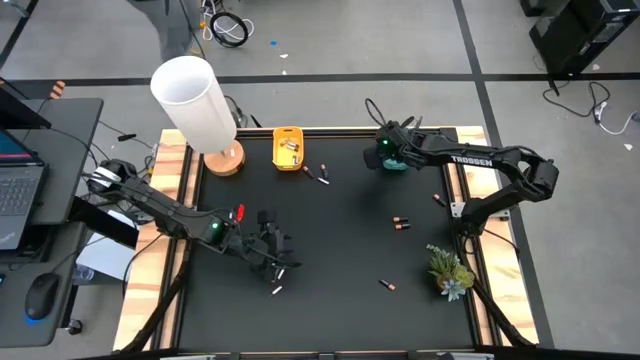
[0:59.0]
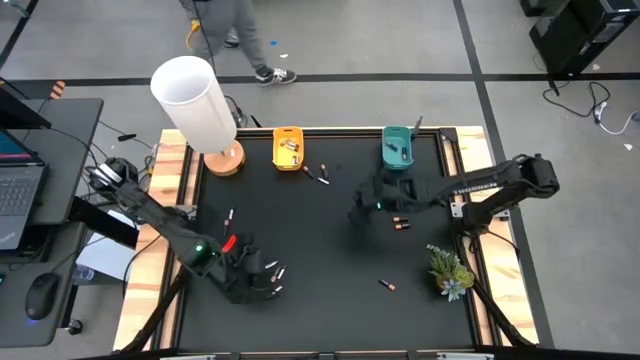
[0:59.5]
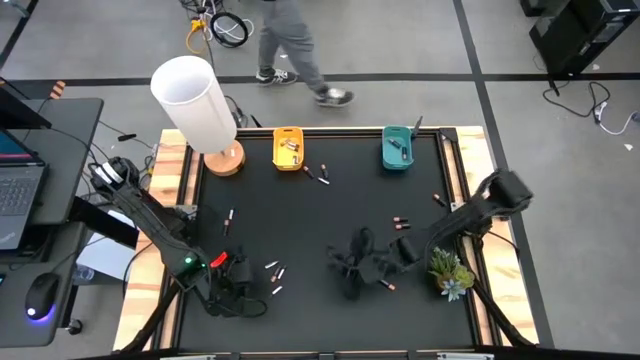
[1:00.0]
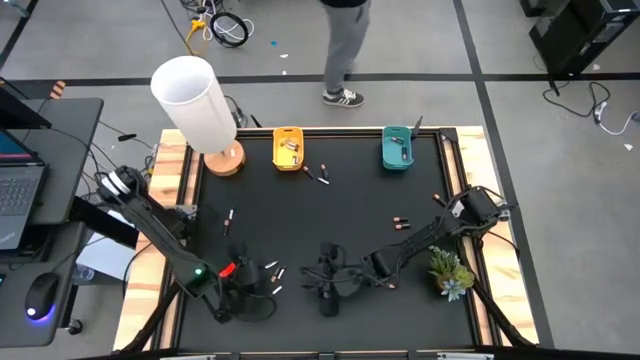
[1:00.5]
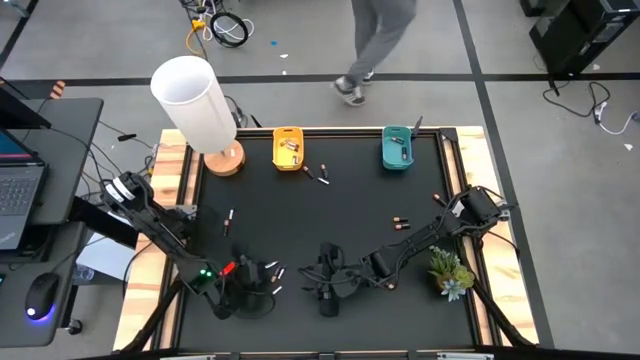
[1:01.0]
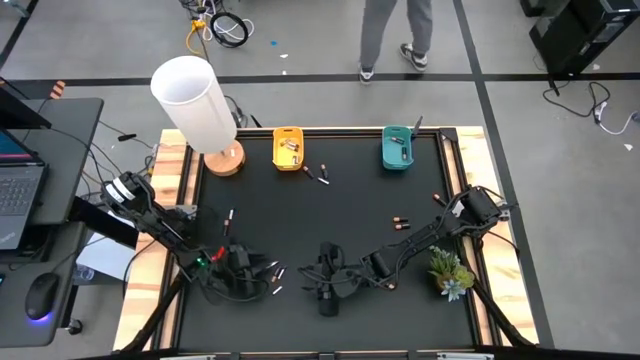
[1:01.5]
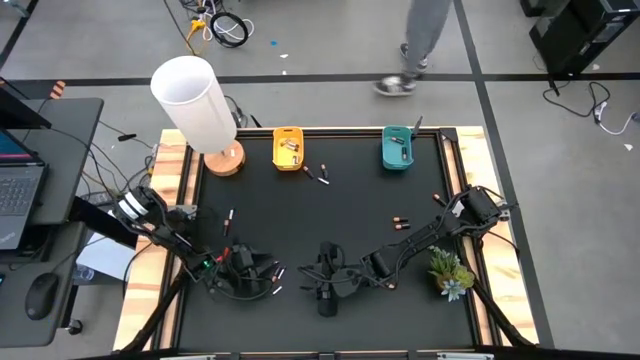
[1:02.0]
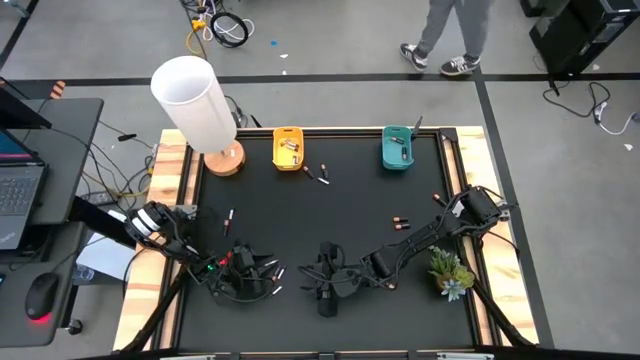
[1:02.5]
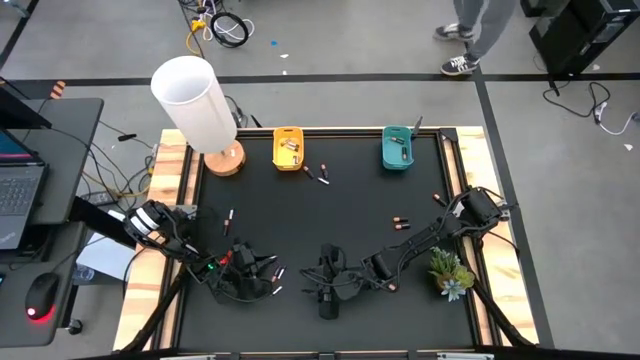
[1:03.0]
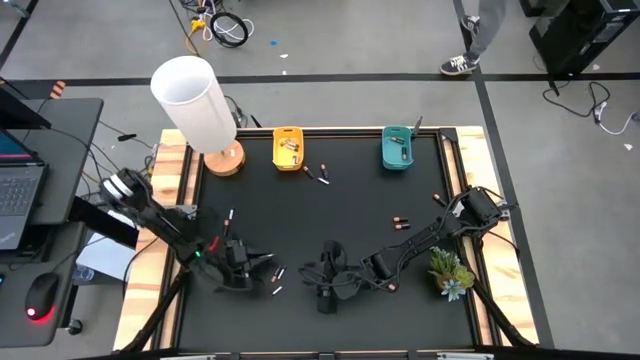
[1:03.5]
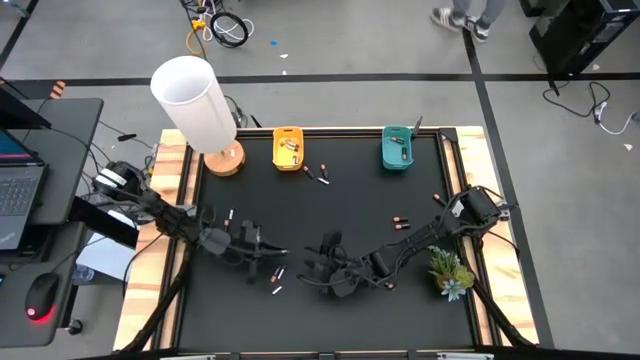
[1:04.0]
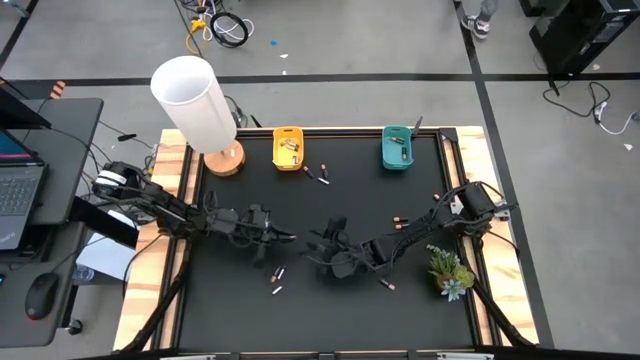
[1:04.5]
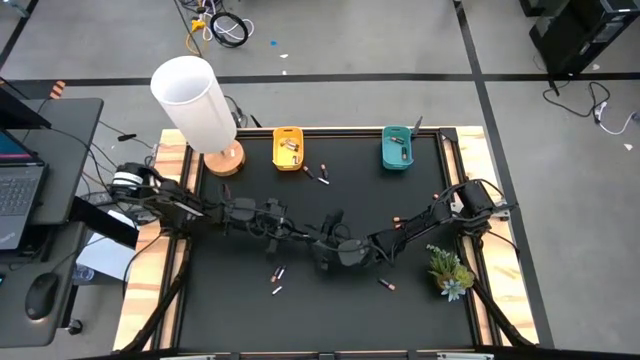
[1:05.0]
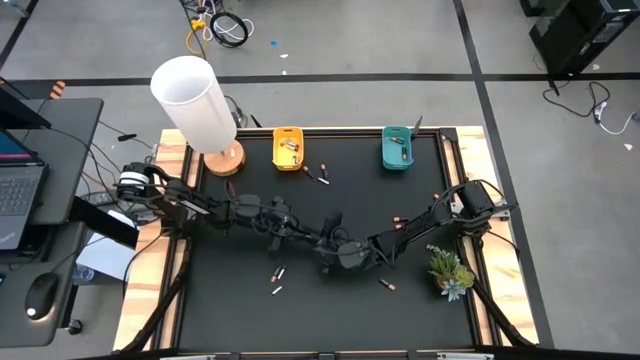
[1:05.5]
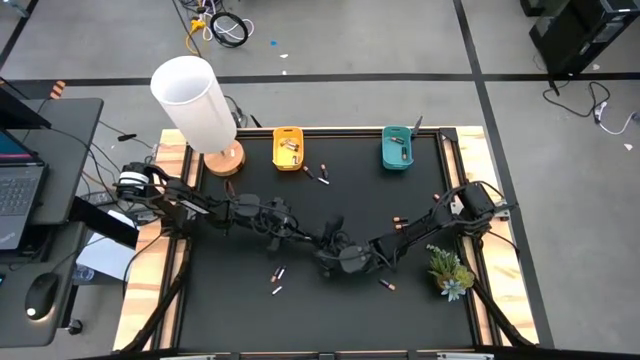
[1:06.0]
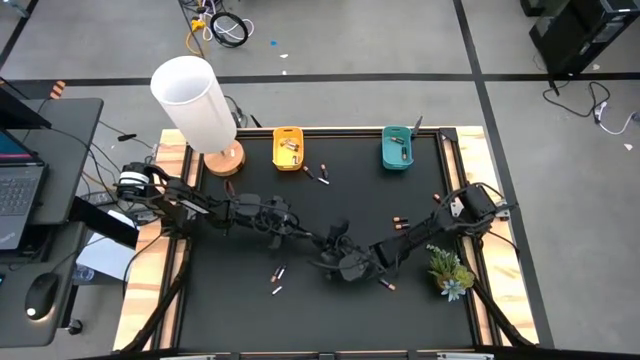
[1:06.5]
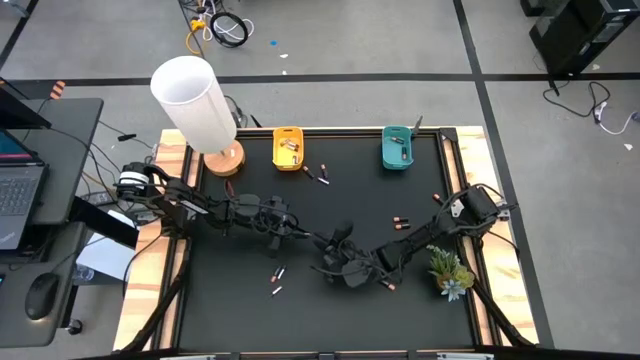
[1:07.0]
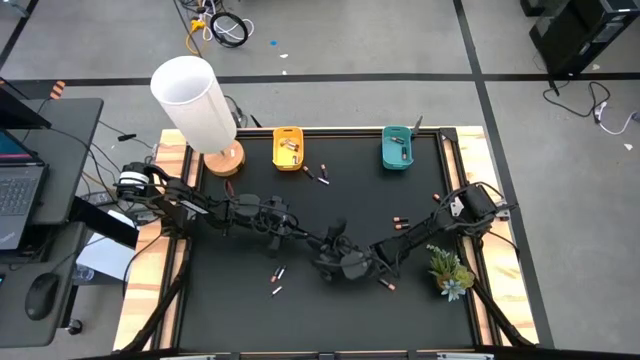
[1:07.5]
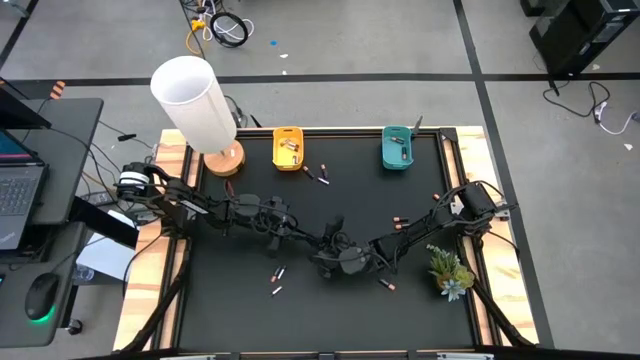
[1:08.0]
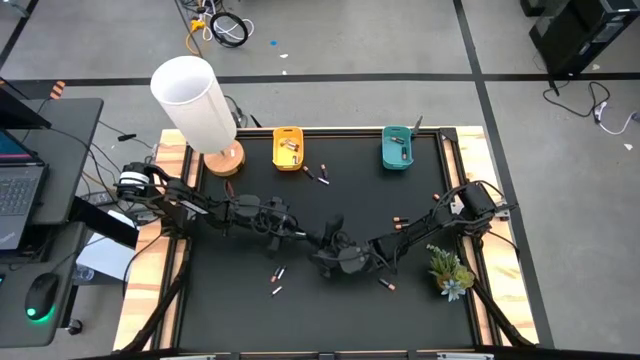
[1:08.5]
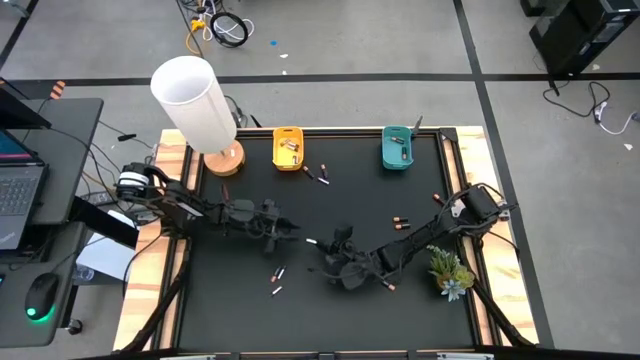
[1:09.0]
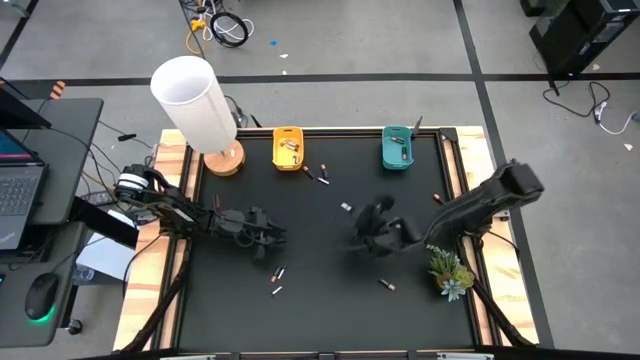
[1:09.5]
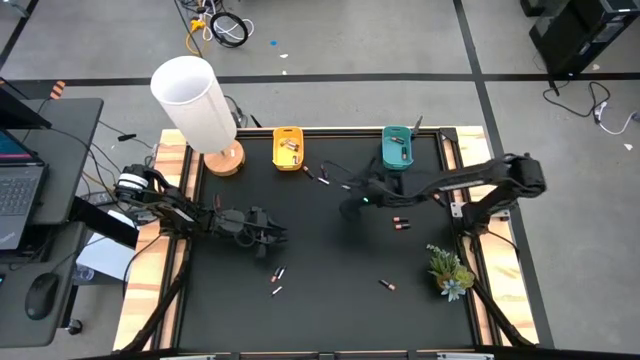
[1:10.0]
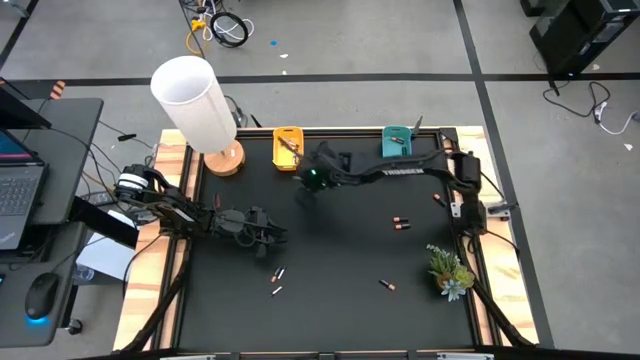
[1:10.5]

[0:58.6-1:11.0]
Task: Sort batteries
Put the silver battery into the yellow bin

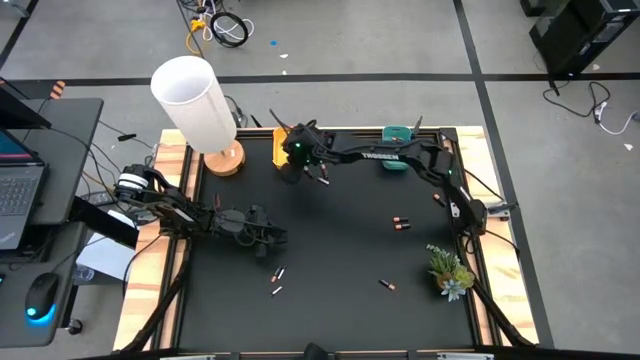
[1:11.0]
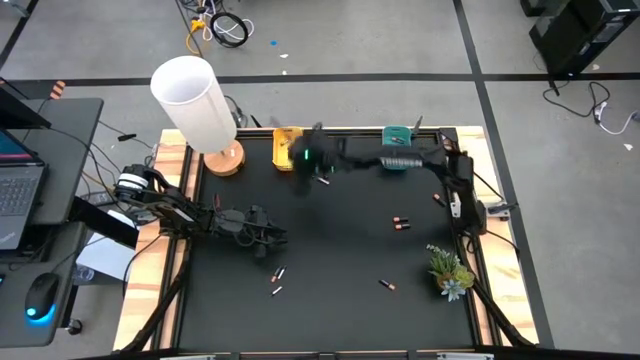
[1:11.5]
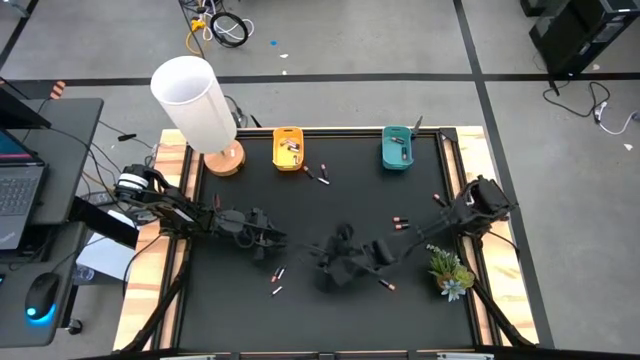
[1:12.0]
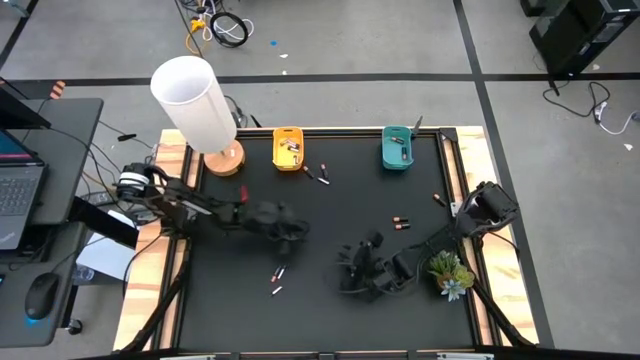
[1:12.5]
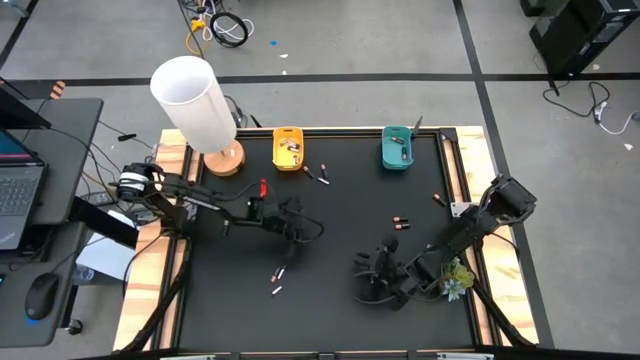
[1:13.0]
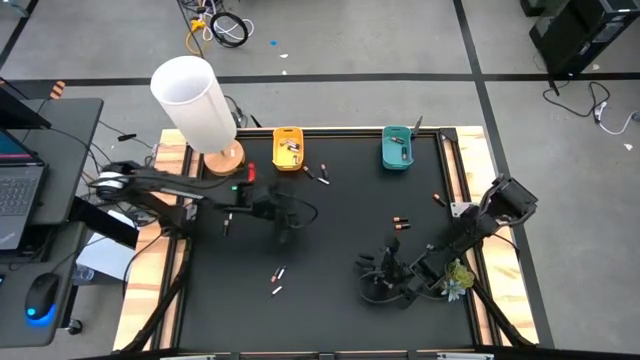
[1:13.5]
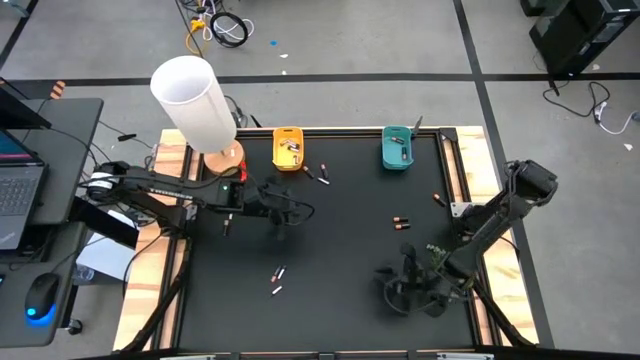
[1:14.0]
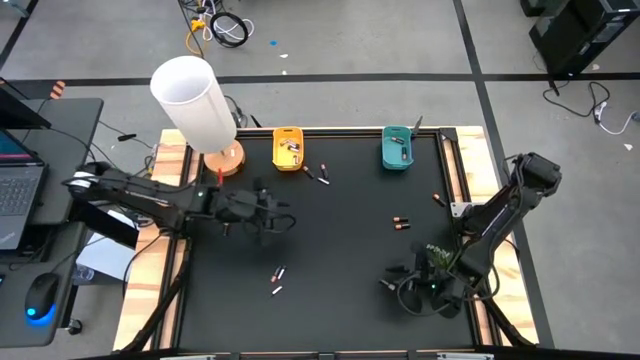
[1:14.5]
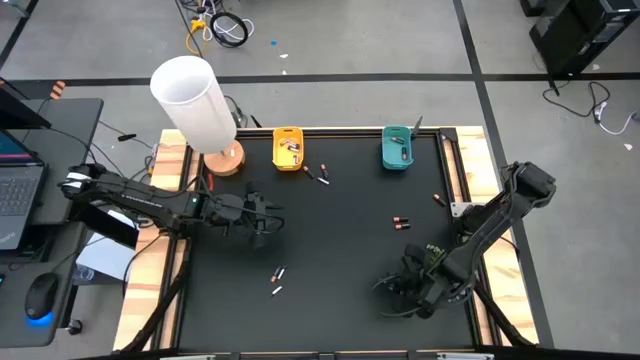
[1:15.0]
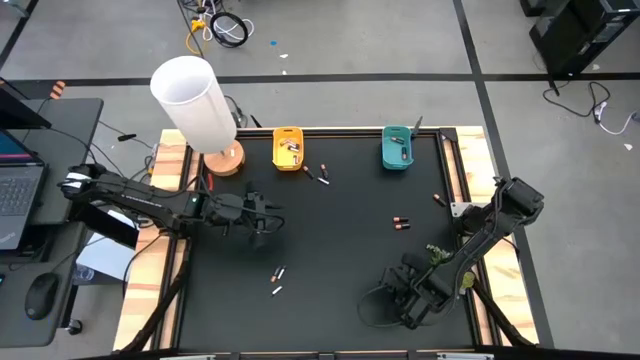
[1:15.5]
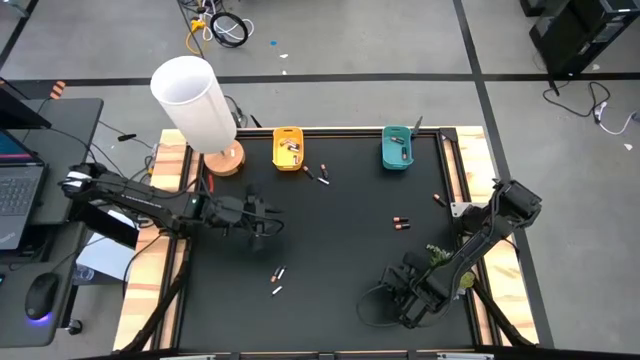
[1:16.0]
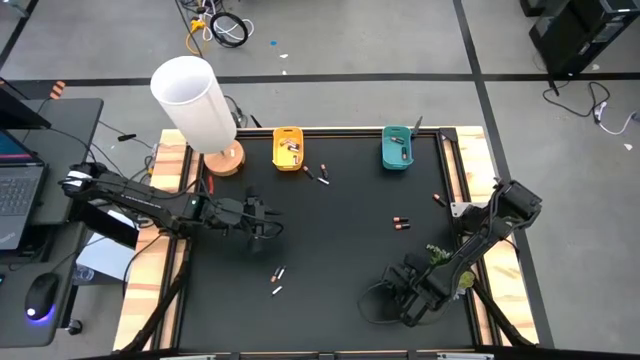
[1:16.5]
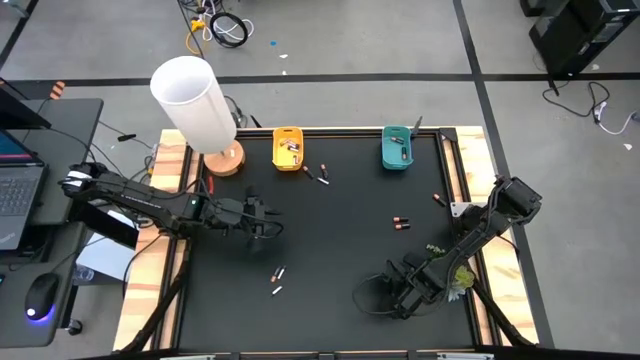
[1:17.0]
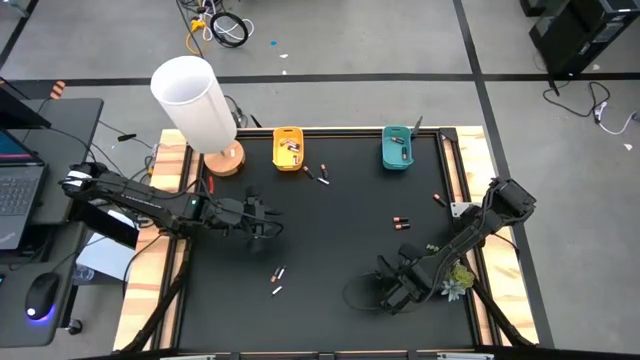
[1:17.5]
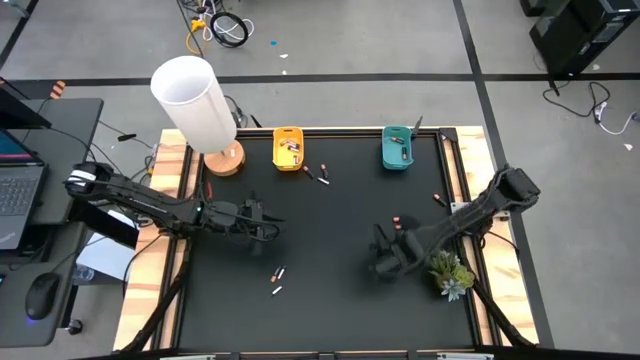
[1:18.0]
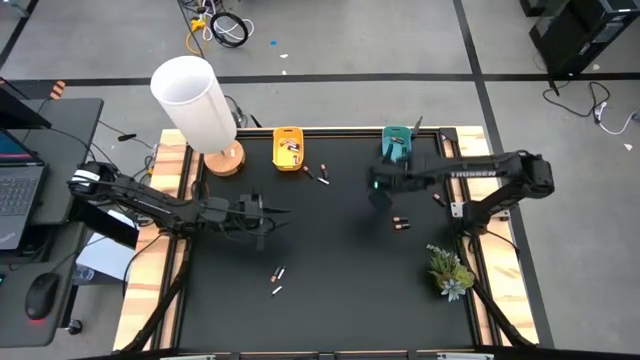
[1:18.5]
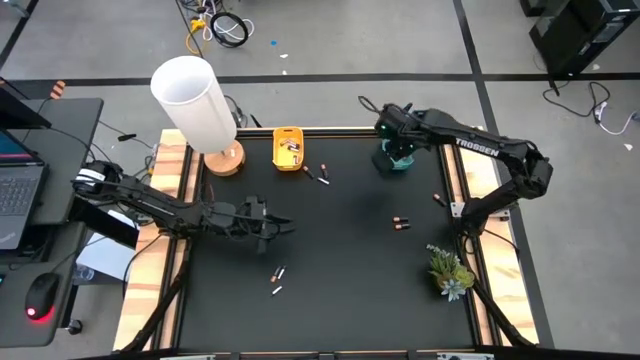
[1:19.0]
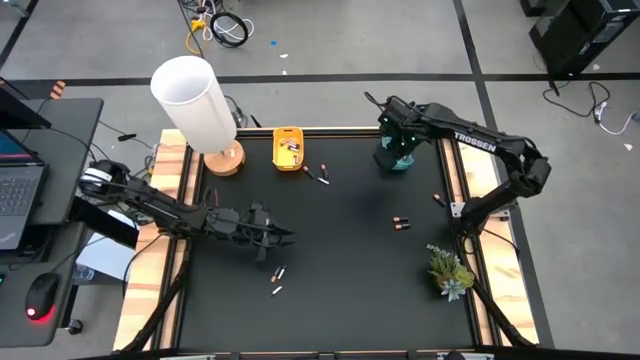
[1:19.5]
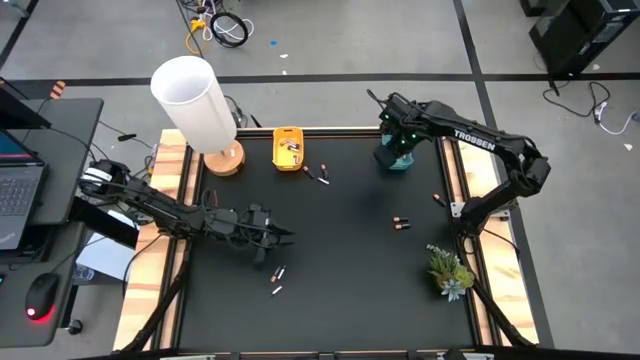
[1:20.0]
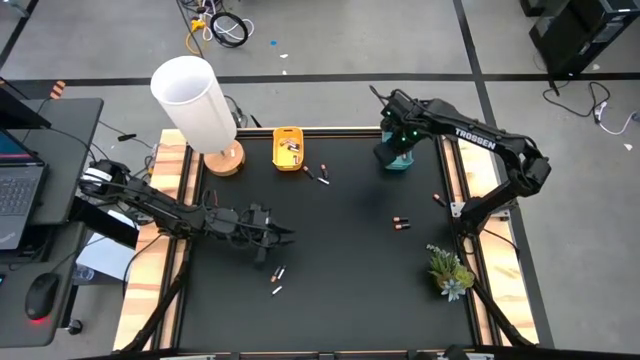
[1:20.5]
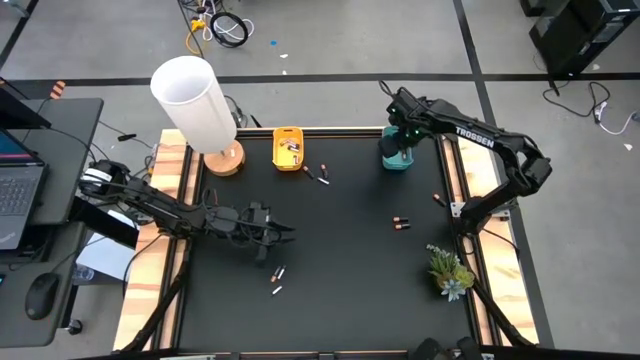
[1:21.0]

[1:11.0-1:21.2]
Put the black battery into the blue bin
